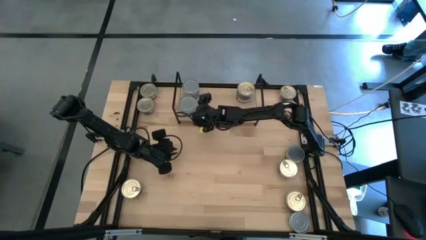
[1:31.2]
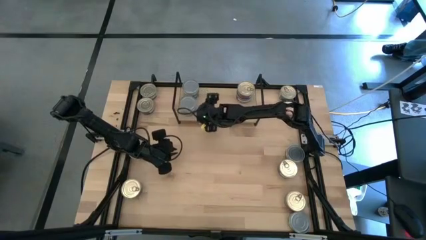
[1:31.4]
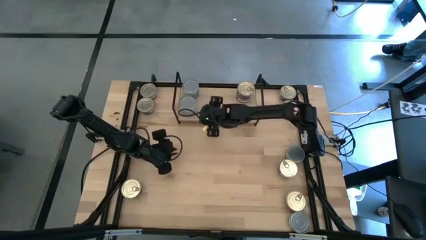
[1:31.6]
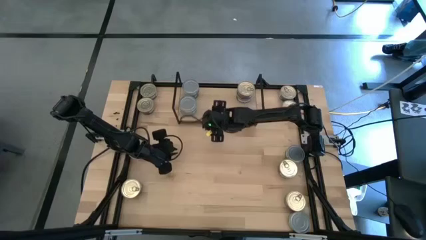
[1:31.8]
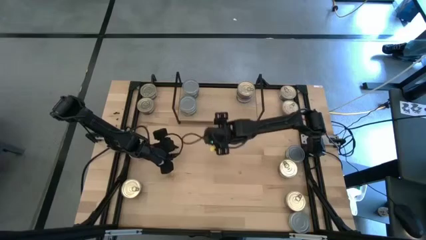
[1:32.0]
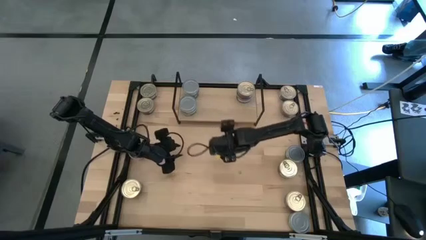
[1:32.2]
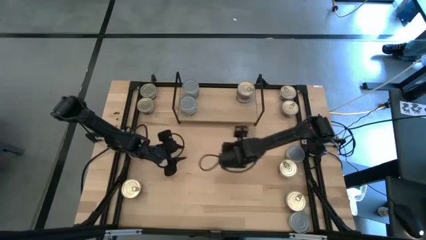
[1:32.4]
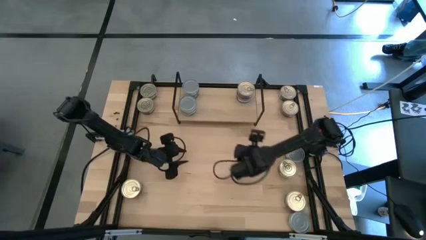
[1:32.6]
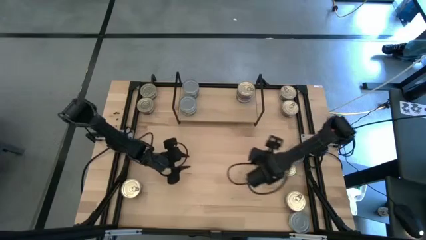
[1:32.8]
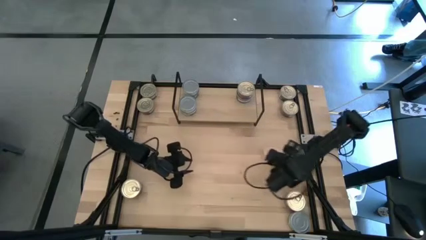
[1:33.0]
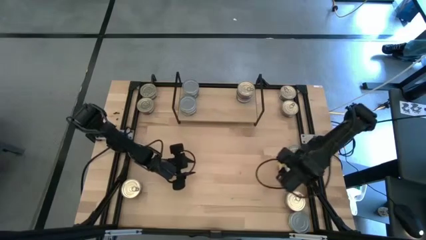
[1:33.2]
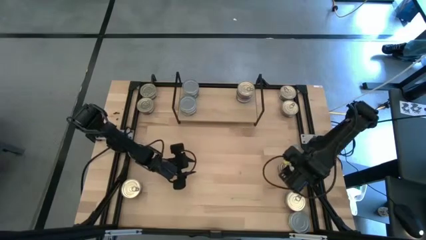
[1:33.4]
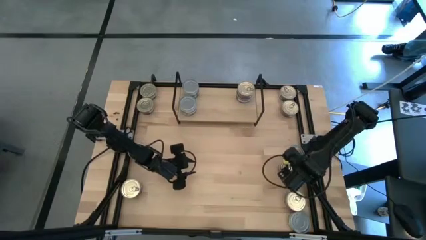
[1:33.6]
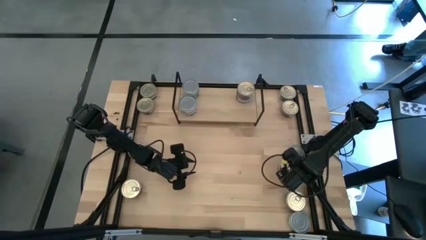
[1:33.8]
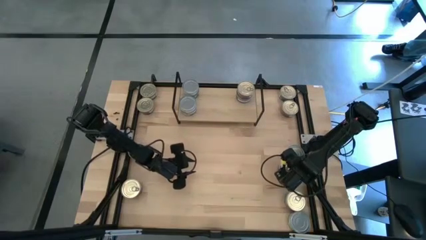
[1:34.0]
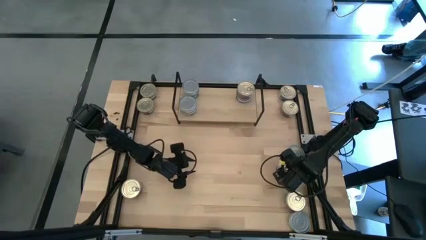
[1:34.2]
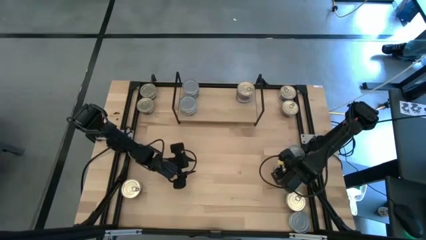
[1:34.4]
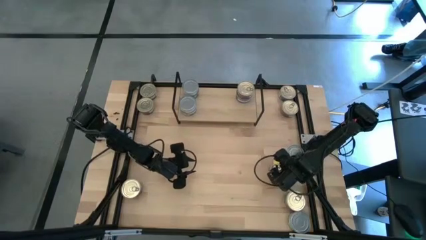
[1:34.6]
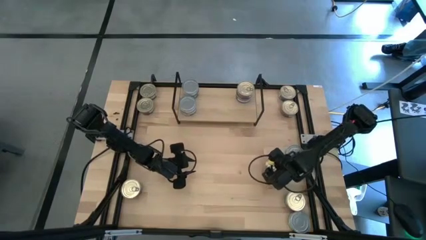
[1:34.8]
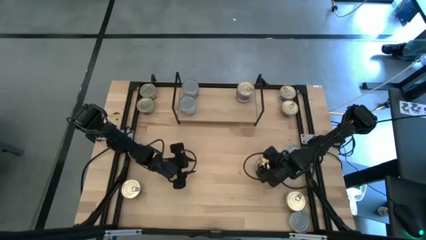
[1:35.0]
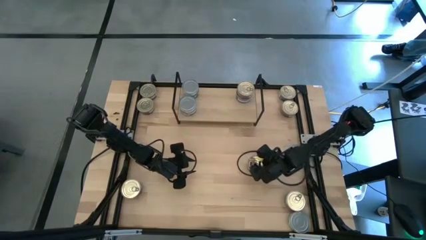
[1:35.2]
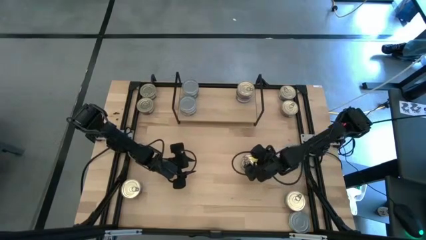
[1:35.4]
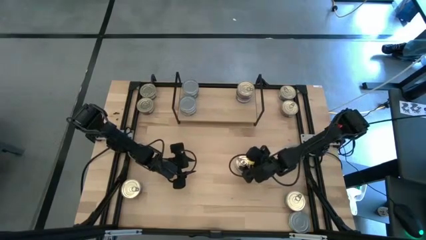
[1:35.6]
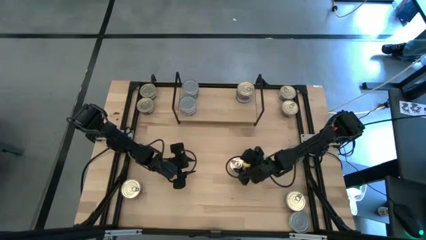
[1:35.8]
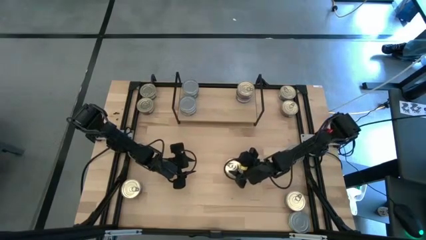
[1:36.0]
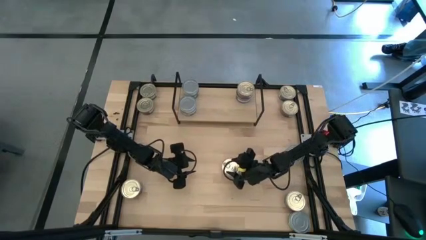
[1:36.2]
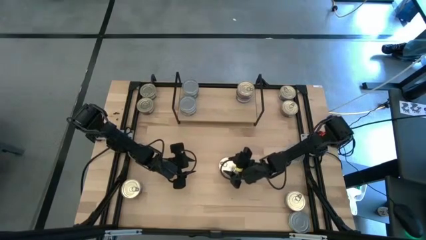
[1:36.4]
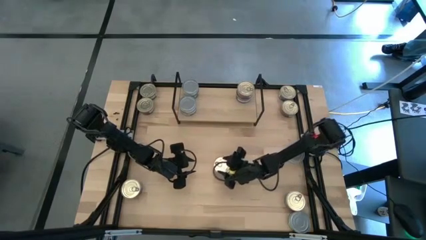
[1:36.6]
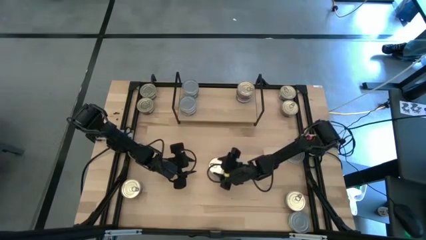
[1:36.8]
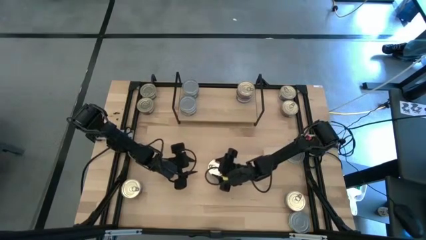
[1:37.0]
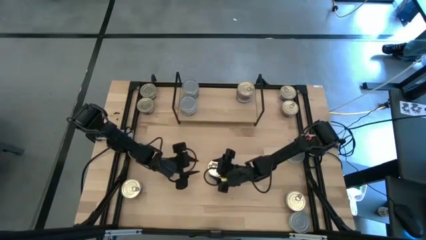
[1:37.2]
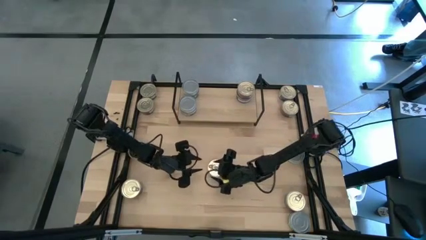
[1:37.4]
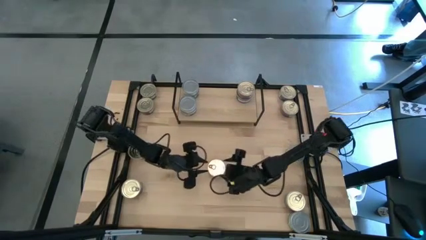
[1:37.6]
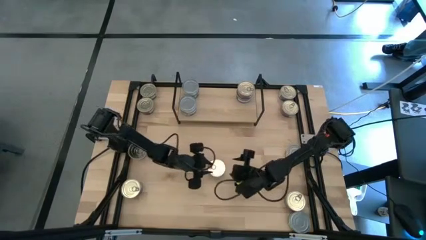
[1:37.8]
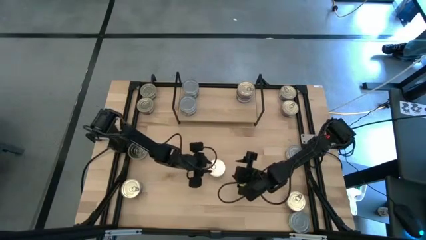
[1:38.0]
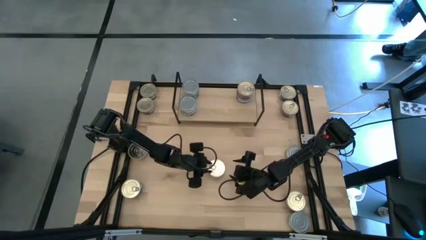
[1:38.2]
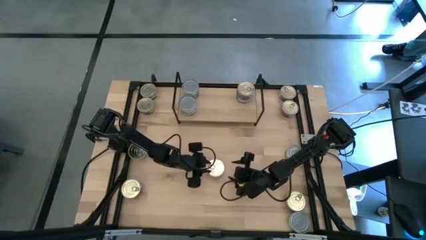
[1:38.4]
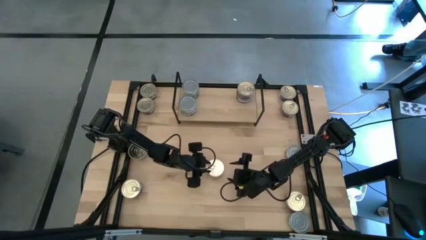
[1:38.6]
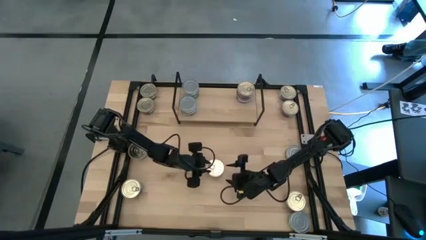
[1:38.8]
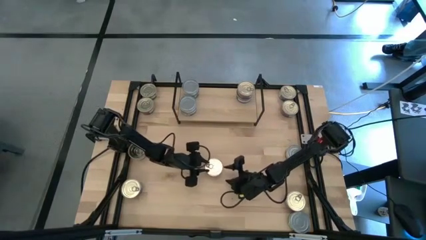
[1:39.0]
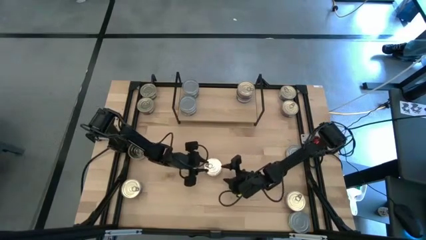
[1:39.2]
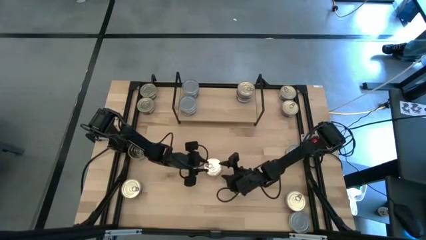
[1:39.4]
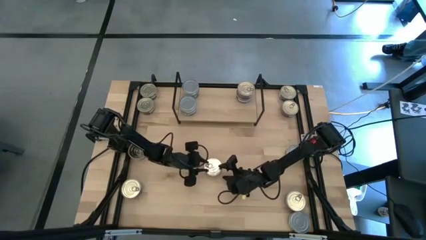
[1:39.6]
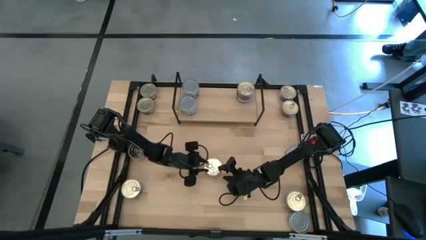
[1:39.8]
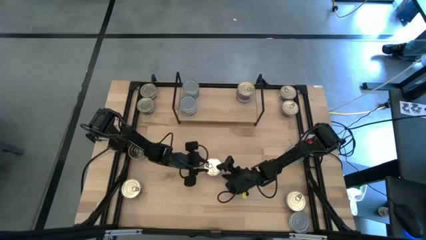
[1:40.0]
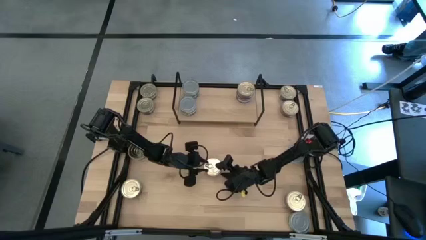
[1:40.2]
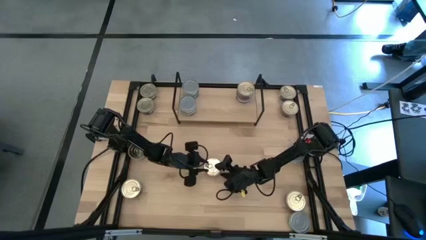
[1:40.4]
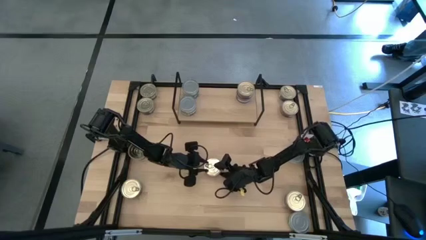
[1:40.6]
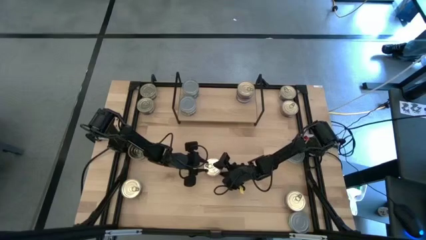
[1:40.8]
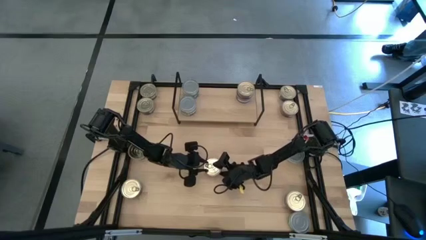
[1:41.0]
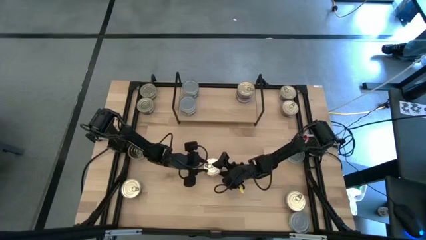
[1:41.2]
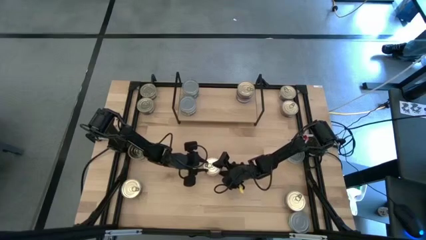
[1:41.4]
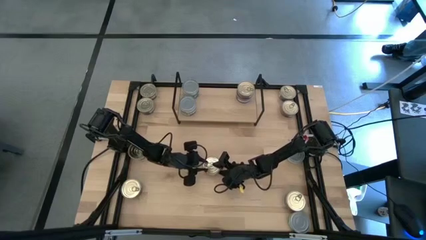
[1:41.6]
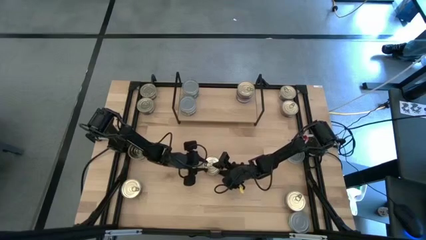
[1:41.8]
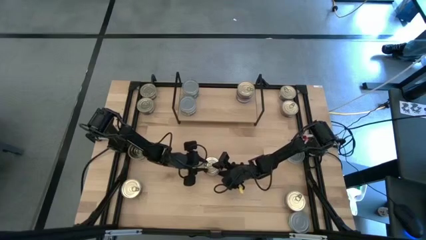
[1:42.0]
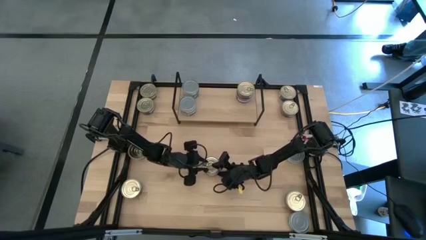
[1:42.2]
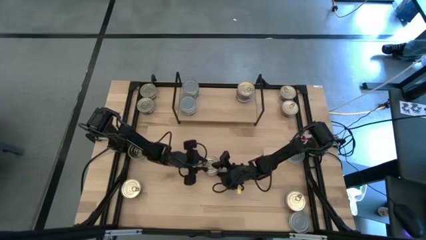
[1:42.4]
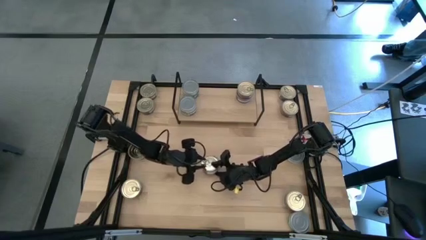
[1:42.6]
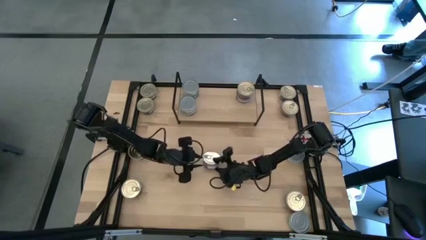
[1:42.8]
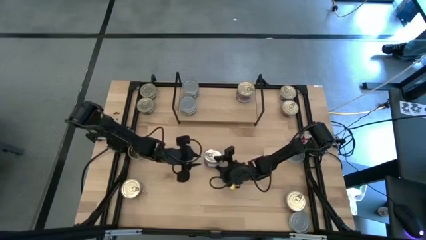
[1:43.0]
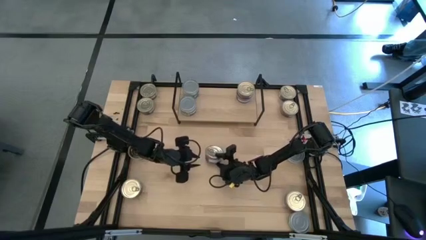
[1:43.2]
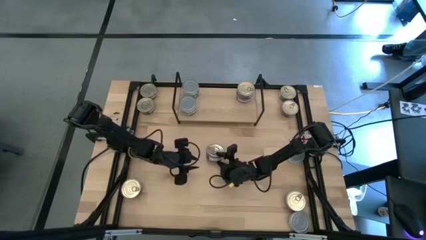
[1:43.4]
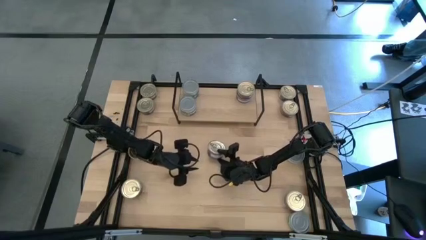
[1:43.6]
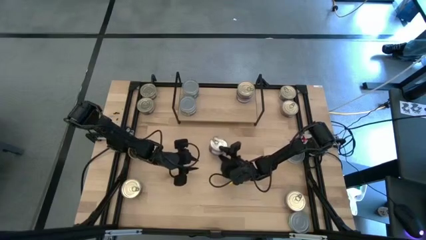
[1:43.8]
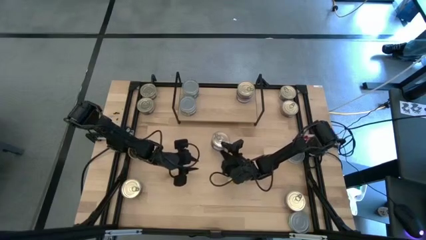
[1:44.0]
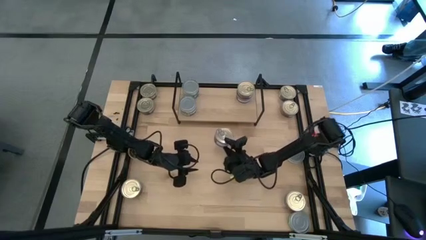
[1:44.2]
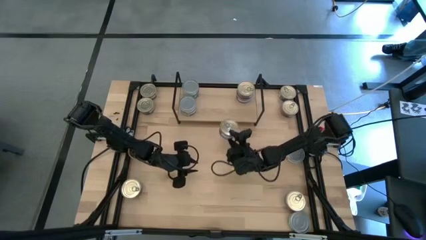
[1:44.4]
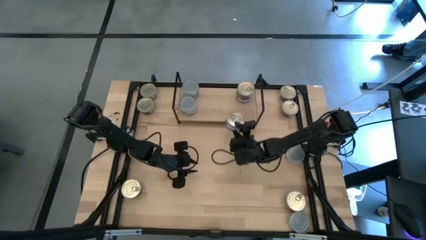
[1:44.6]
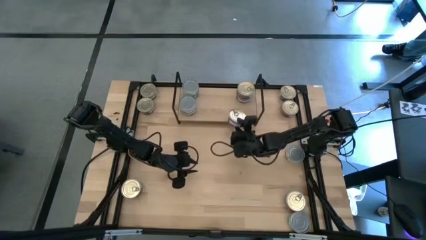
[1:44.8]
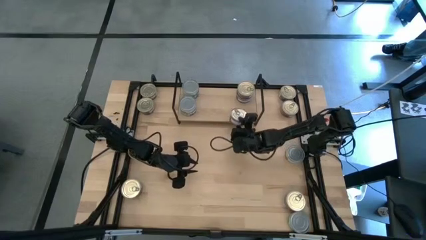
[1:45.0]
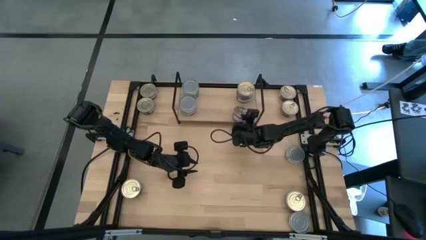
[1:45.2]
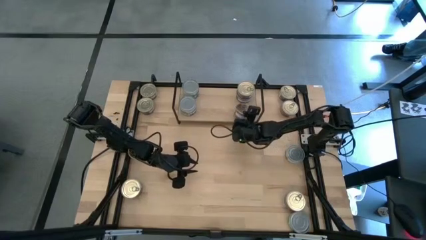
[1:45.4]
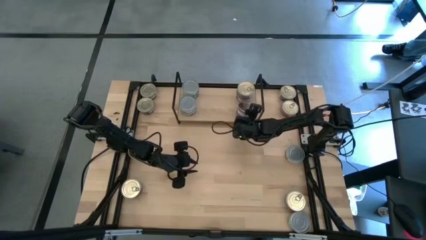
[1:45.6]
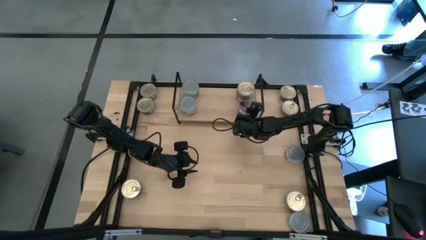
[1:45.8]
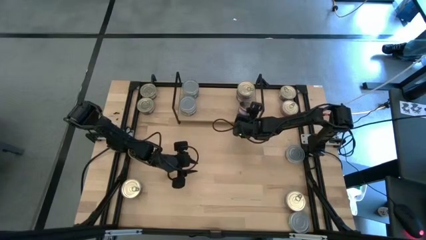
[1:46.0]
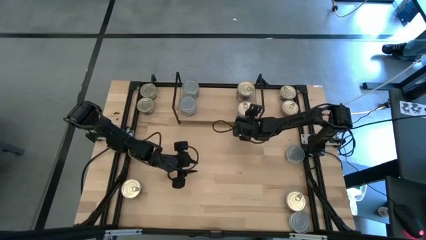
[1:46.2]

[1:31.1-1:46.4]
Task: Stack canned seafood by type on shelf
Put the blue pink tuna can on the shelf aligned with the stacked blue pink tuna cans

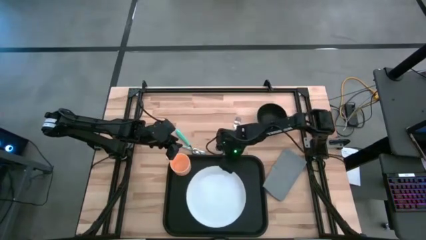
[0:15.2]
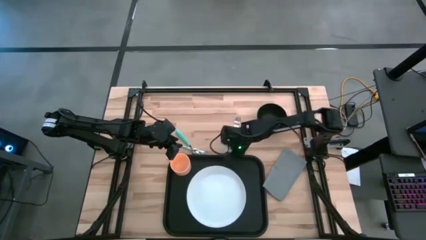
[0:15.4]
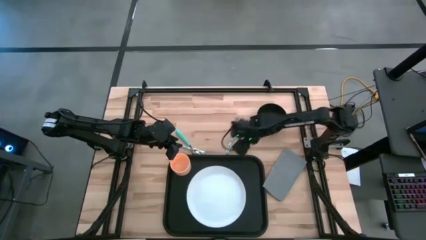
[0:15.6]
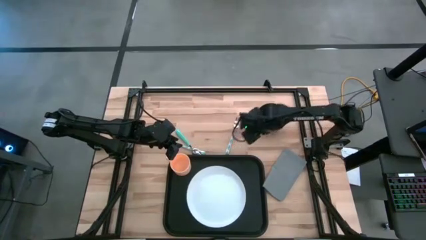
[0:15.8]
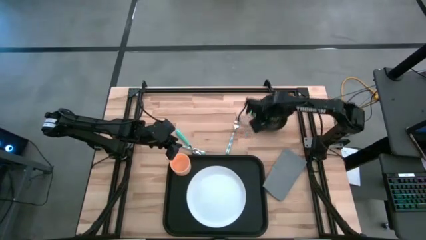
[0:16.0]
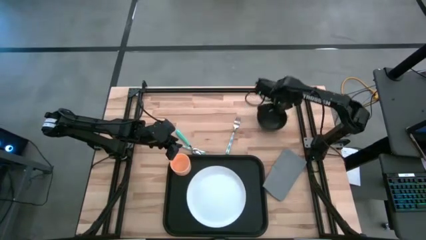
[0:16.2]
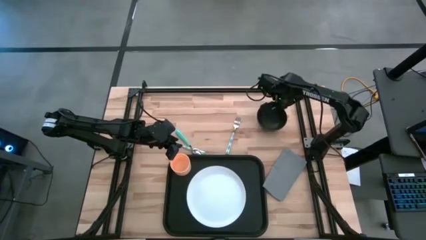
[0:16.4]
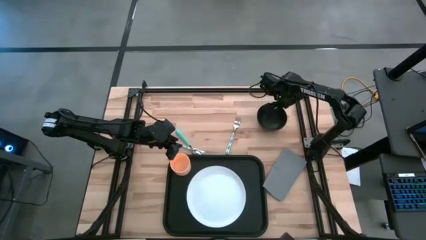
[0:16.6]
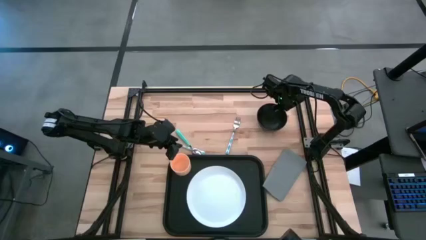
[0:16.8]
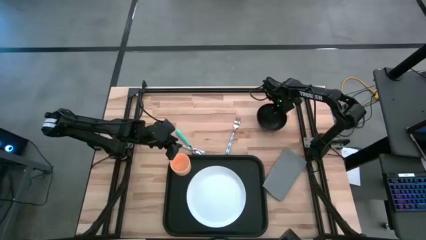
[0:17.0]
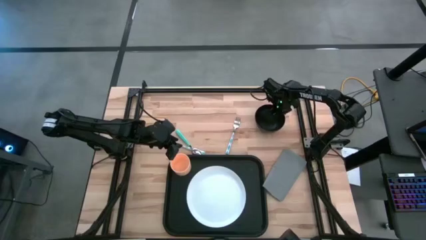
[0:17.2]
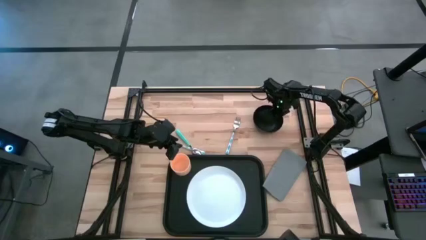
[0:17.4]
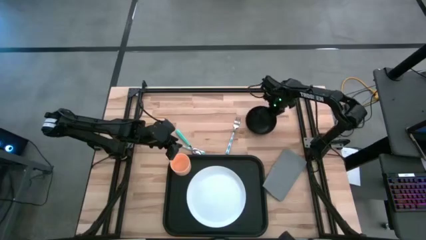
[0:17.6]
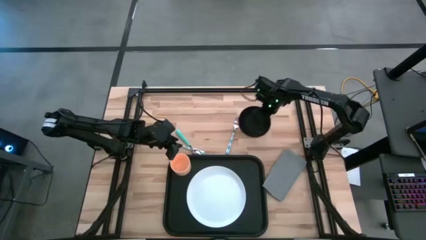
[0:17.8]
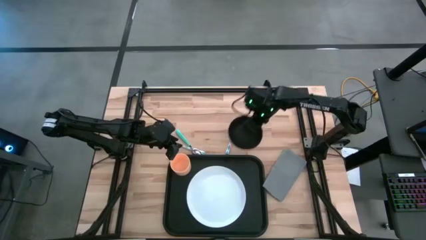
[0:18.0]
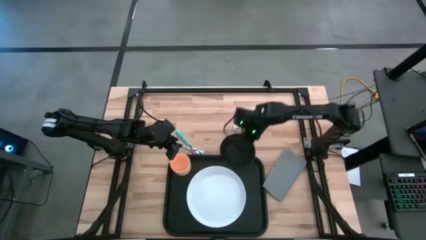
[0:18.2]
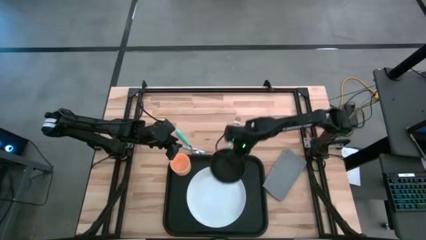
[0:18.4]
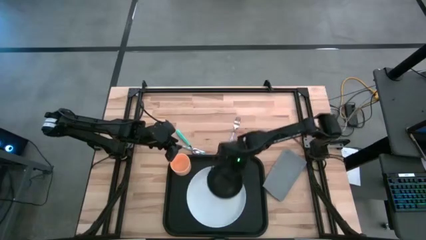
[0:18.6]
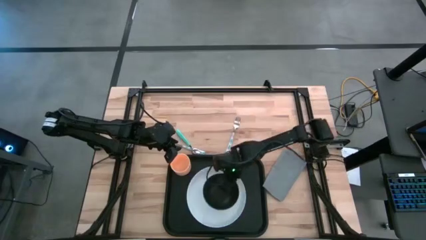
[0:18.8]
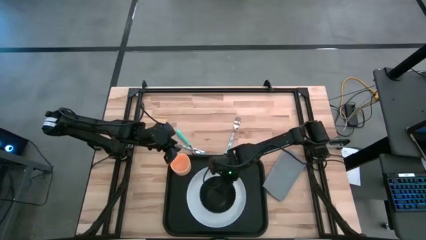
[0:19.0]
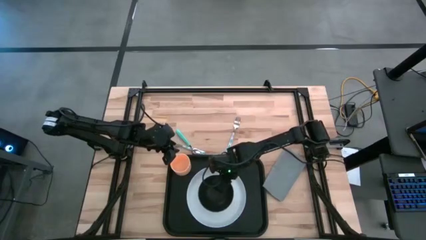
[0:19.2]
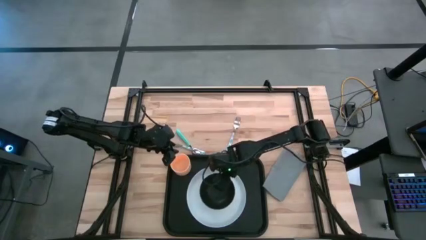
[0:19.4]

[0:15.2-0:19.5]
Task: Set up tray
Put the black bowl on top of the white plate on the black tray
